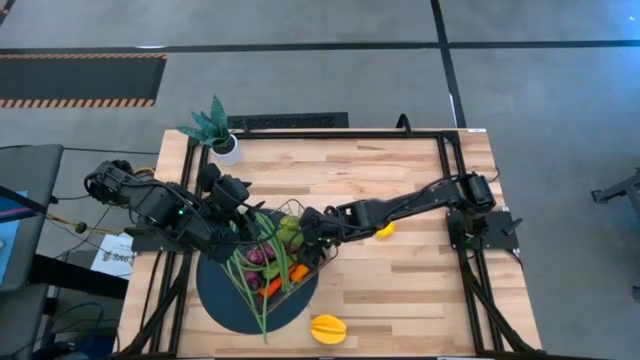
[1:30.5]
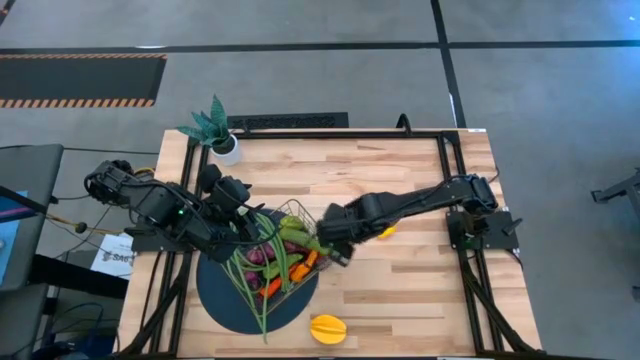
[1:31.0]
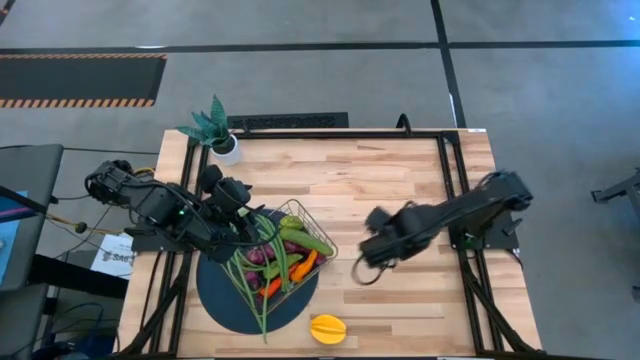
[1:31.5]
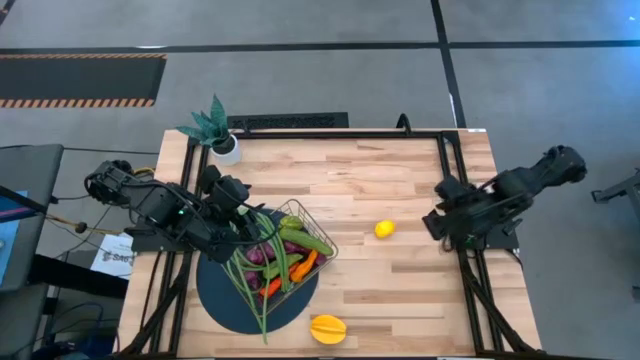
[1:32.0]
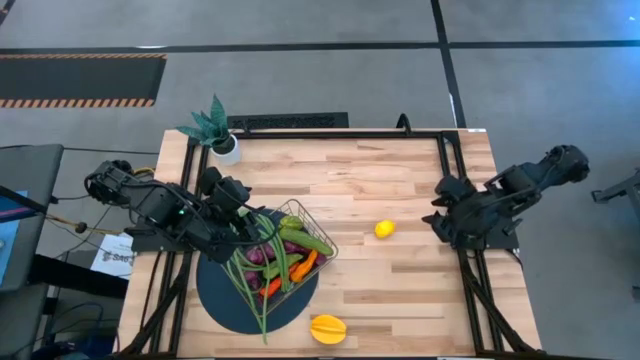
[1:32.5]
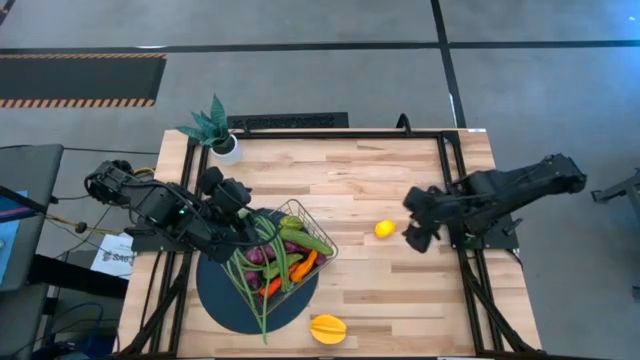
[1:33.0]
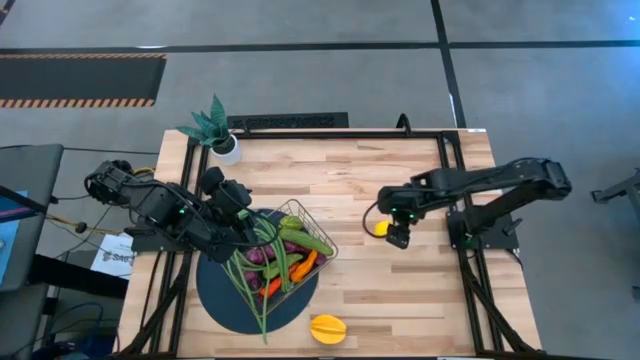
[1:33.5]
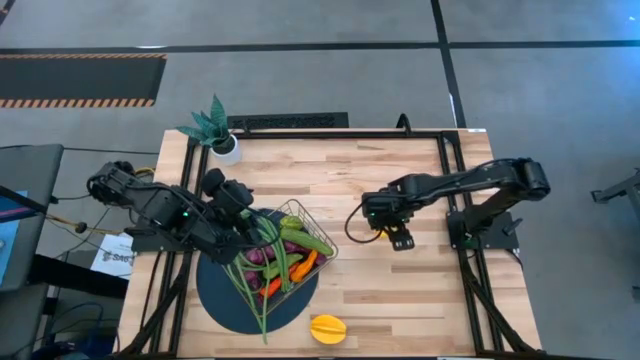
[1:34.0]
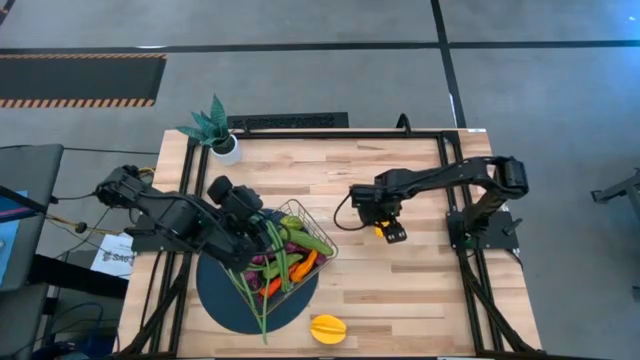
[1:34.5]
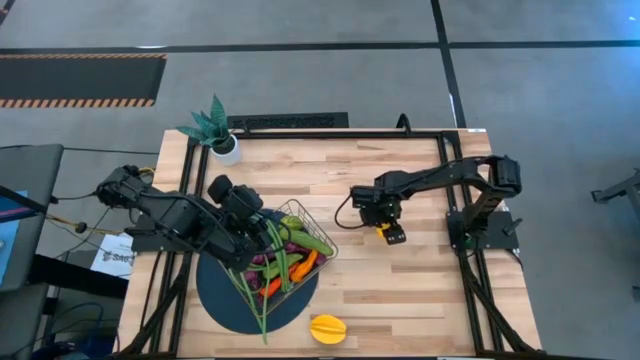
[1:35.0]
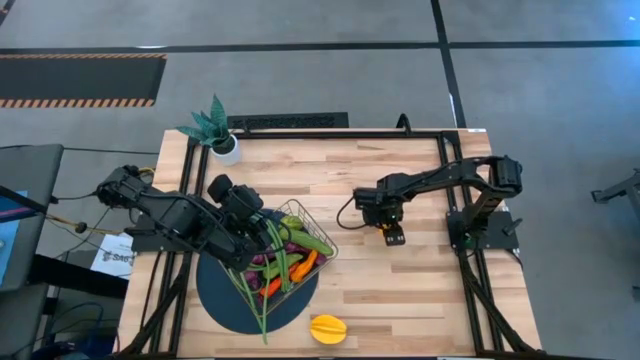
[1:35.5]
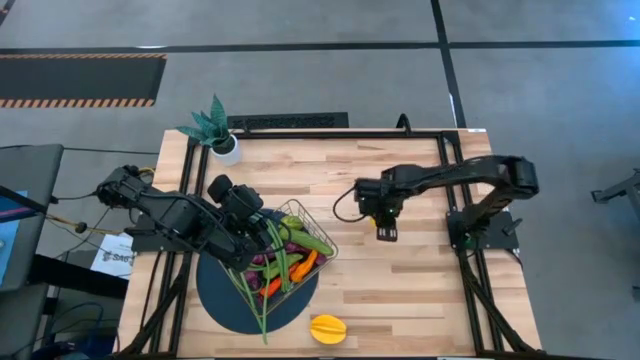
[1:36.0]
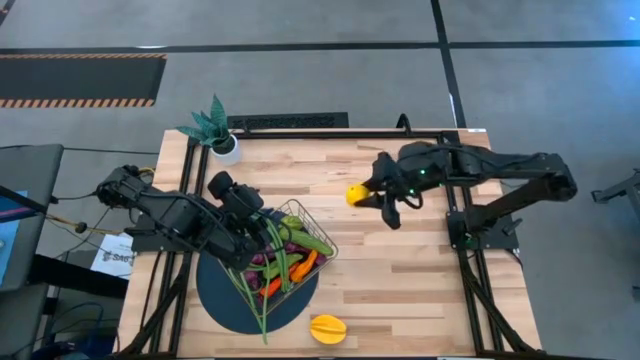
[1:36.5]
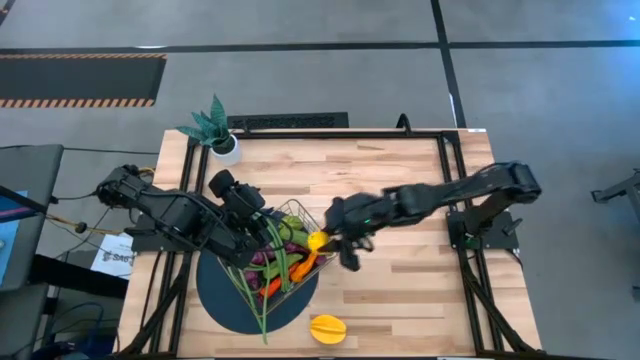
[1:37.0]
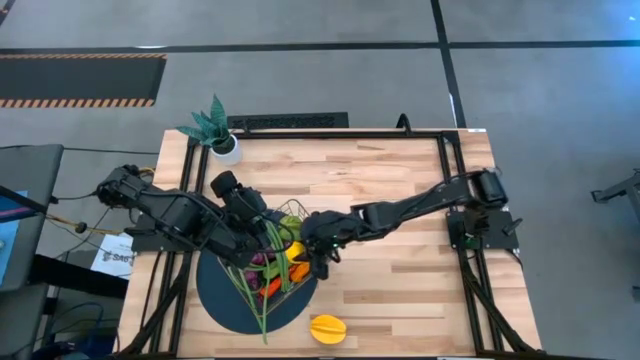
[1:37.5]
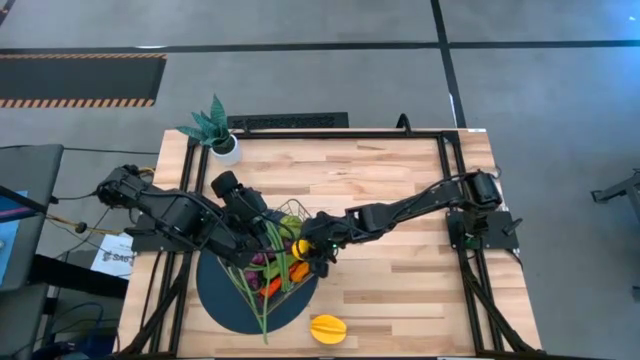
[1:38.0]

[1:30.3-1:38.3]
Task: Build produce basket
Put the yellow lemon into the wire basket

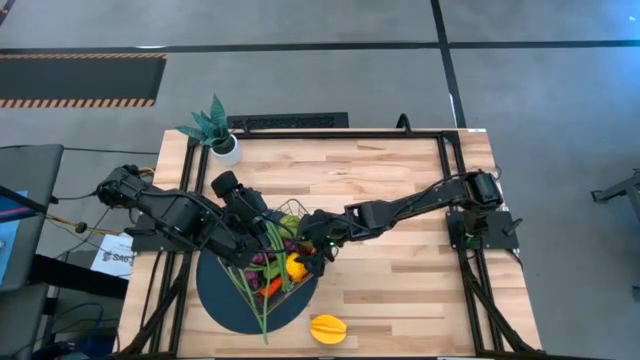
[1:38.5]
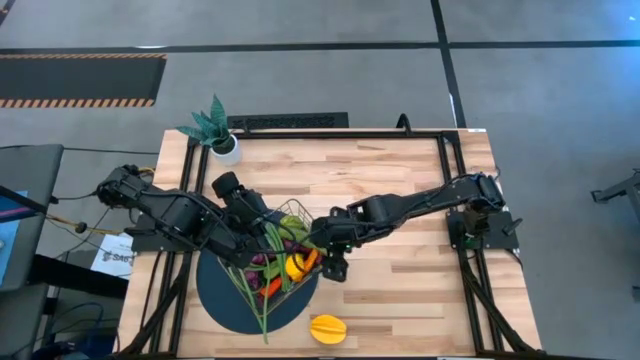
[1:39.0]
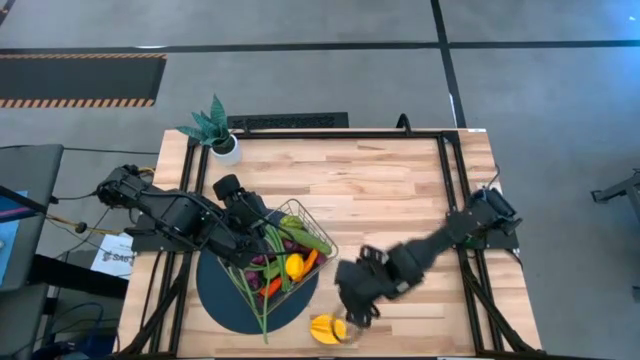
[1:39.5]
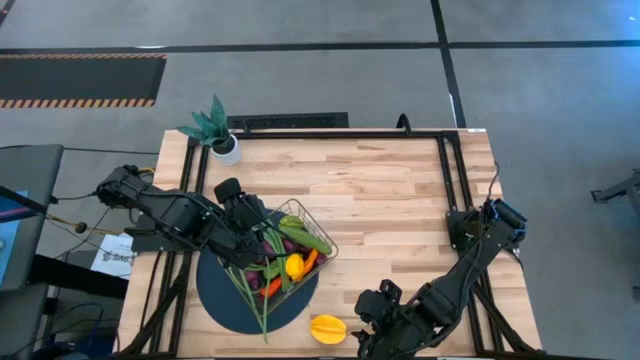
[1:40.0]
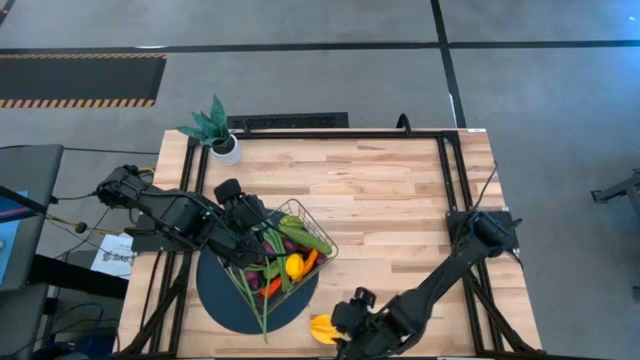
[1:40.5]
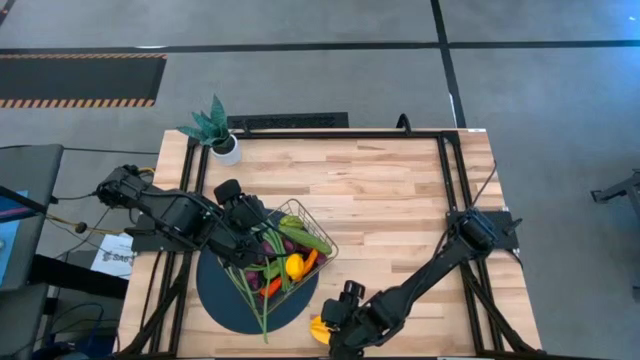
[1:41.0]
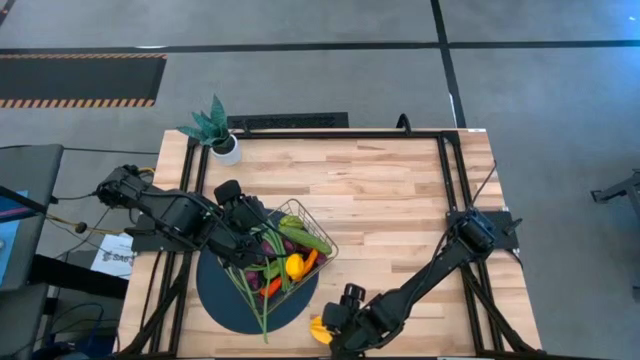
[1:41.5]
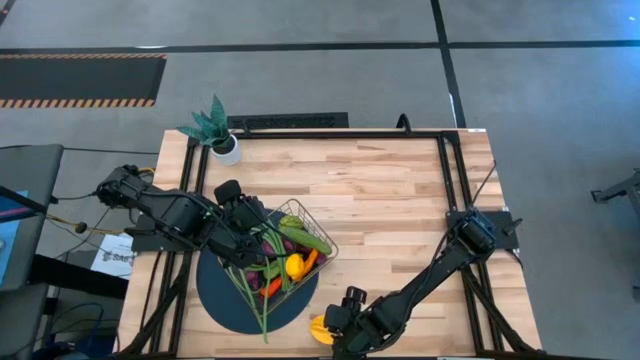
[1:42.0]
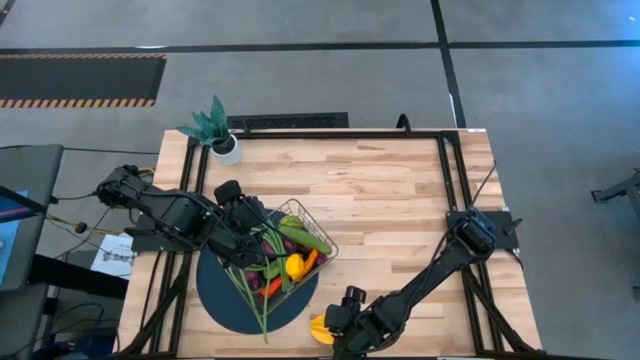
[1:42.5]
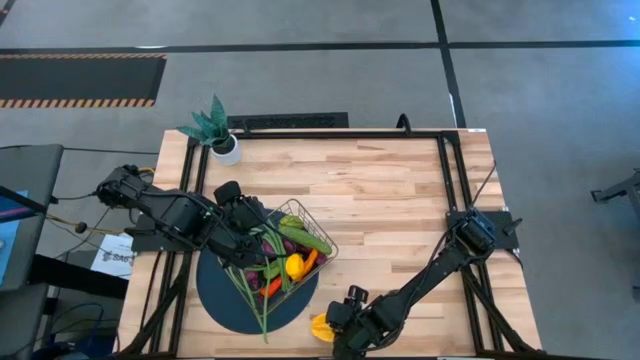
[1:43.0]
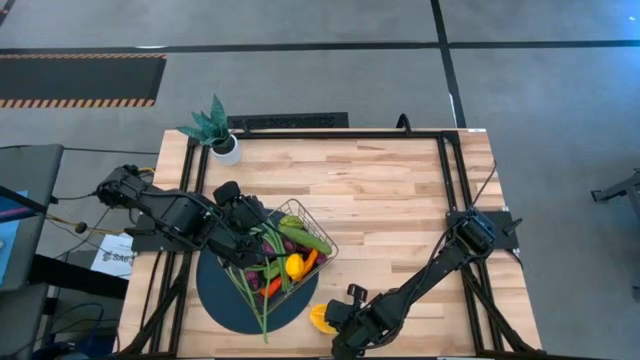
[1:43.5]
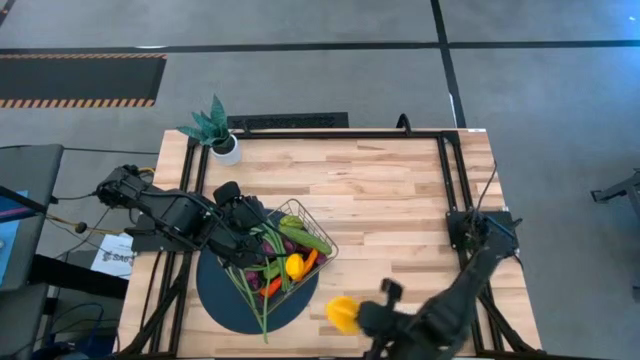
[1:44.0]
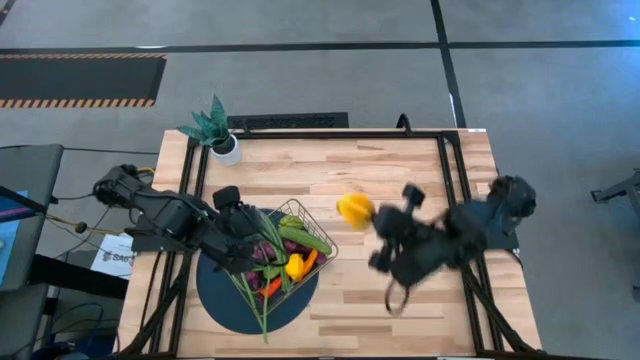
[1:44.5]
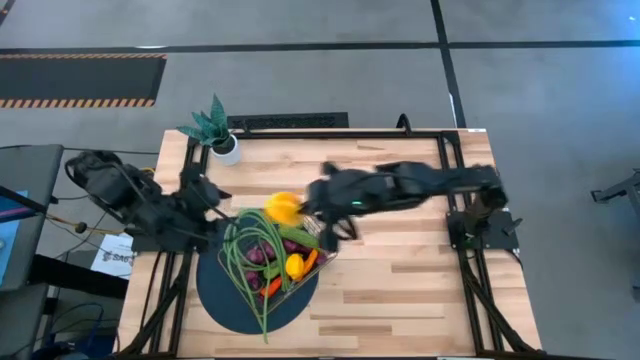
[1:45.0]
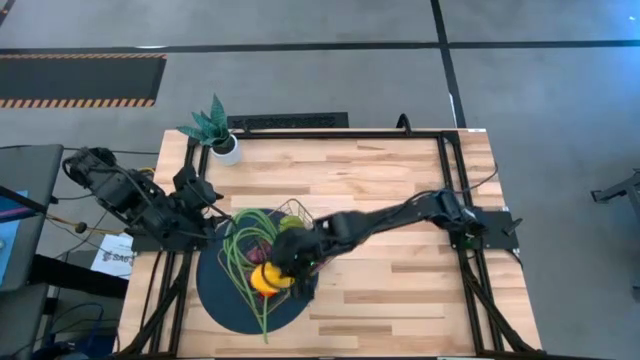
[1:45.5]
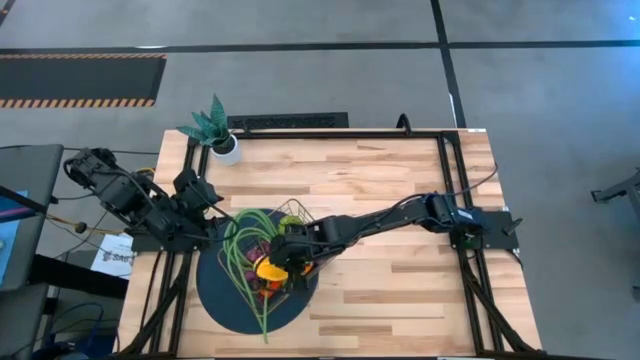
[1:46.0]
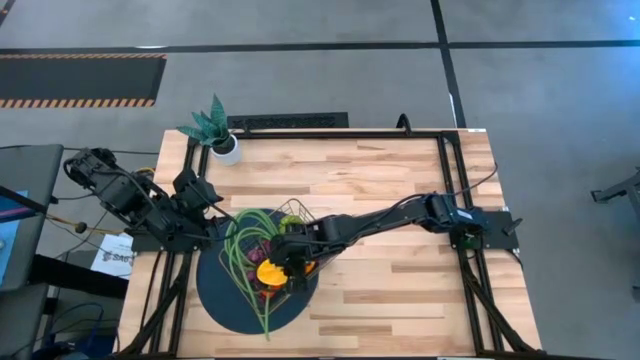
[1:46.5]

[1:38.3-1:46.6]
Put the yellow starfruit into the wire basket

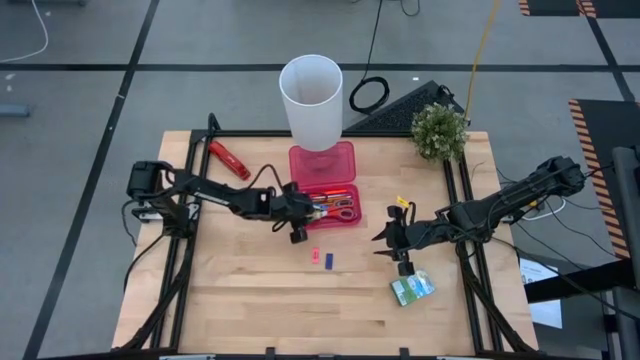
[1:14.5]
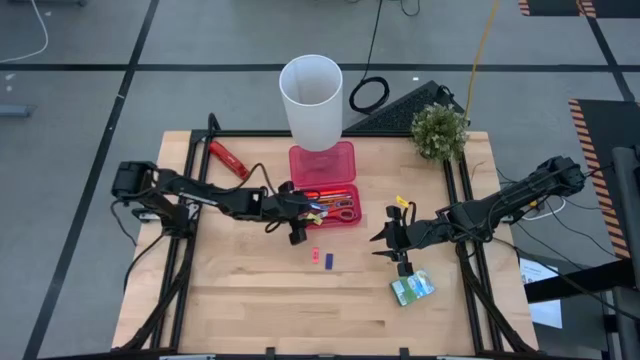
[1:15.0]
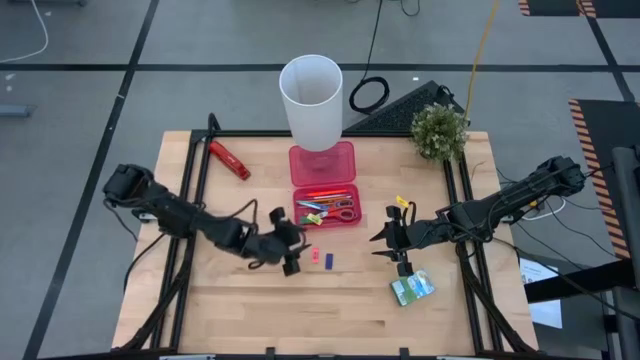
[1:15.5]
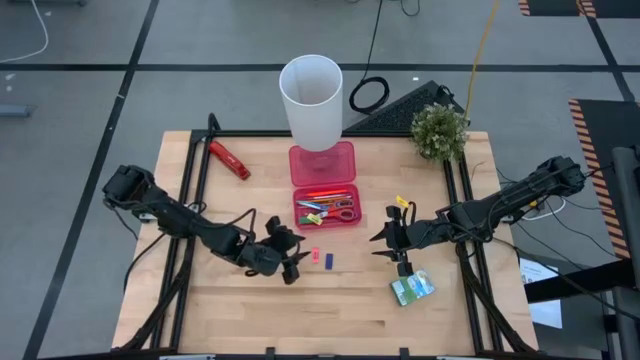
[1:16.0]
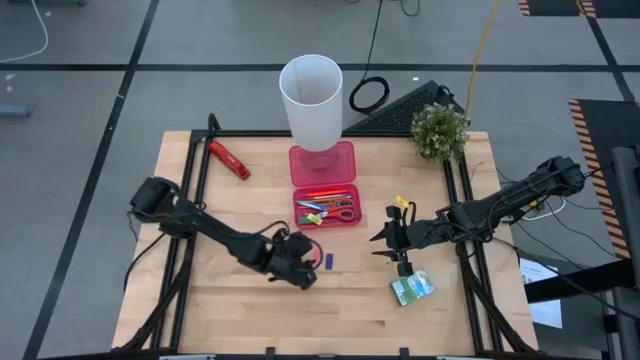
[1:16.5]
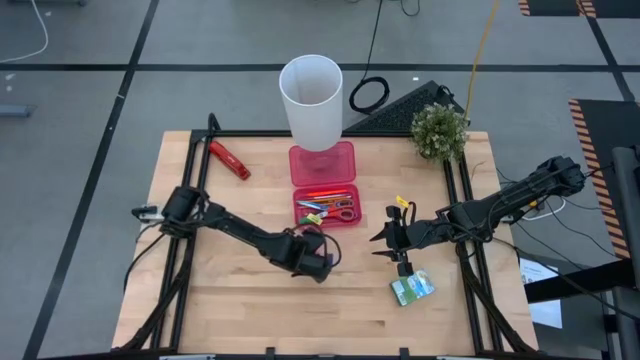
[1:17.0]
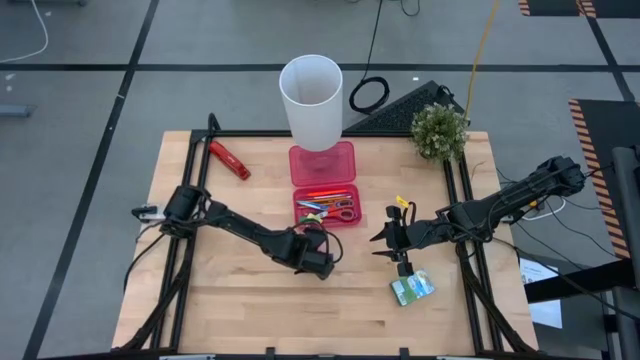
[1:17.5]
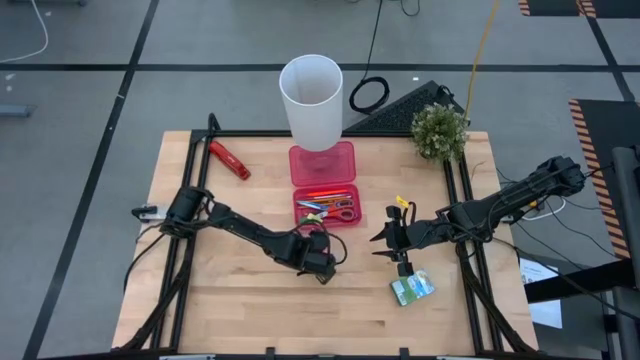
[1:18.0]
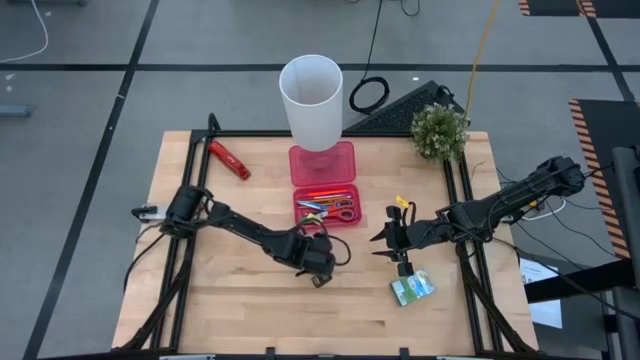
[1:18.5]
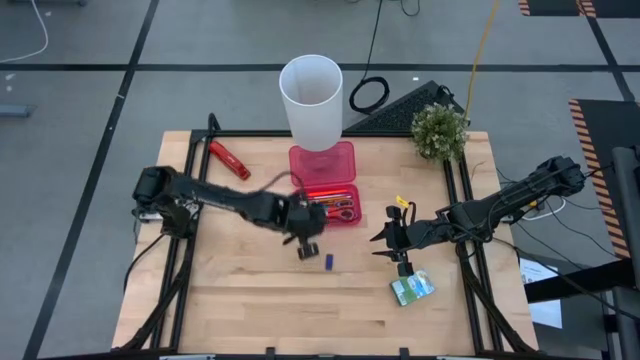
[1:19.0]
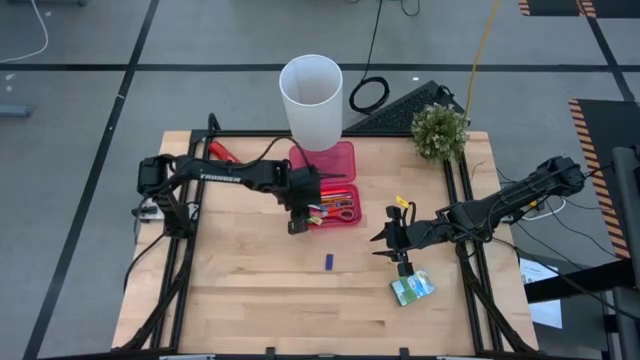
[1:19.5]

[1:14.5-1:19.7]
Task: Pack school essentials
Put the pink eraser into the pink supply box
